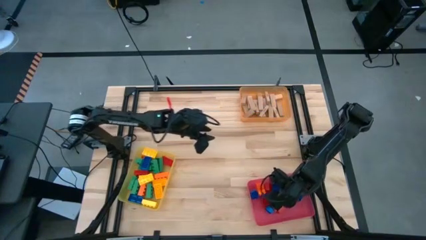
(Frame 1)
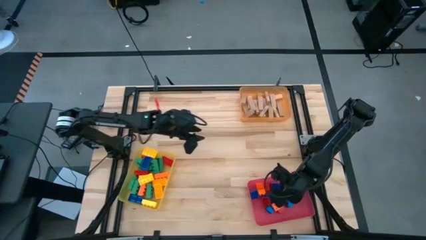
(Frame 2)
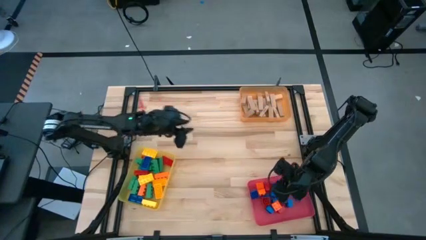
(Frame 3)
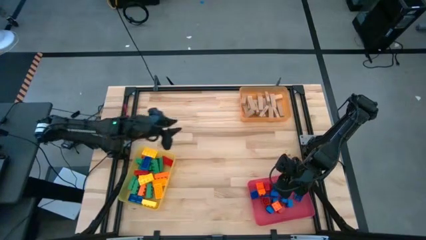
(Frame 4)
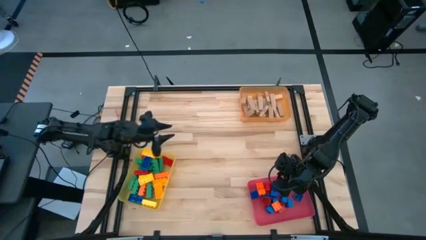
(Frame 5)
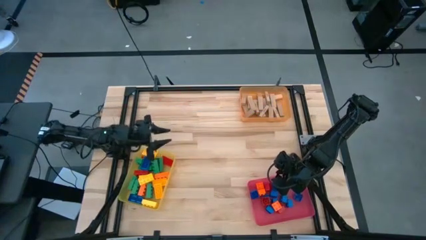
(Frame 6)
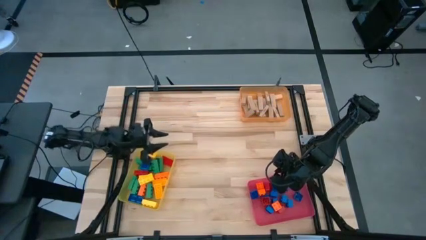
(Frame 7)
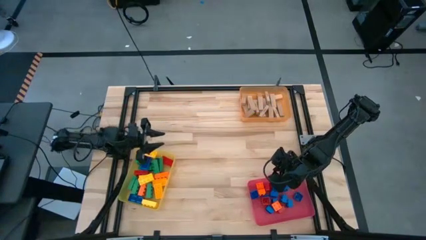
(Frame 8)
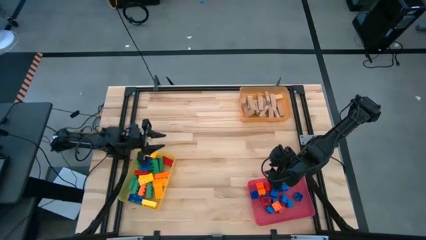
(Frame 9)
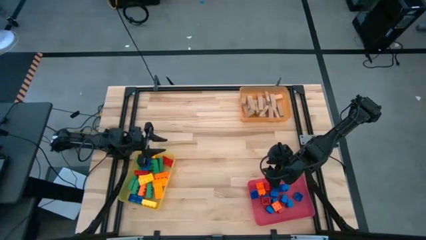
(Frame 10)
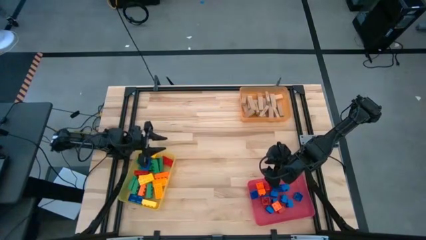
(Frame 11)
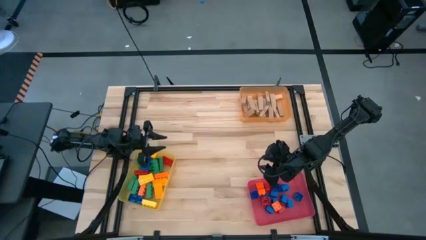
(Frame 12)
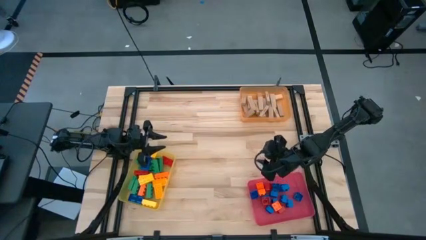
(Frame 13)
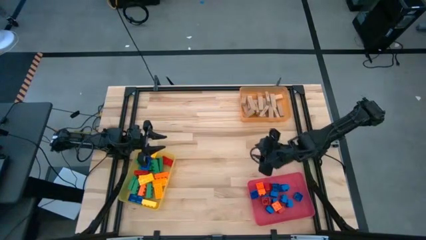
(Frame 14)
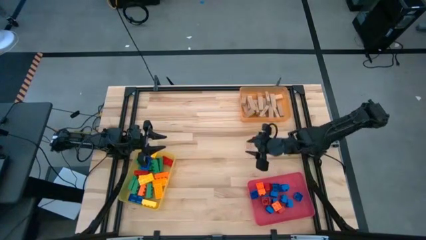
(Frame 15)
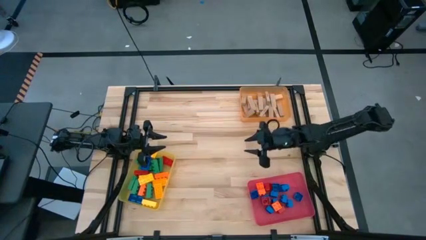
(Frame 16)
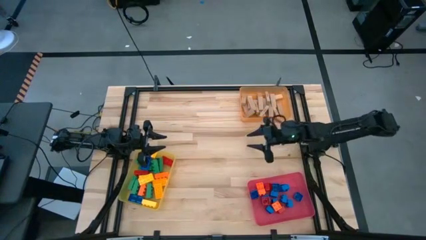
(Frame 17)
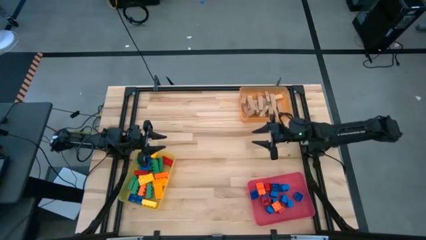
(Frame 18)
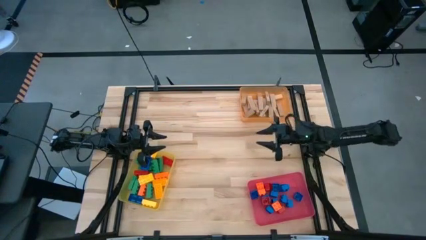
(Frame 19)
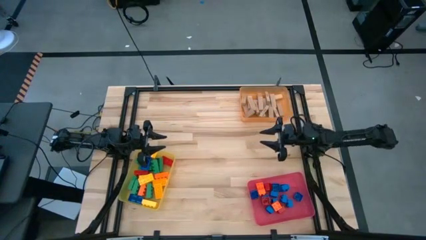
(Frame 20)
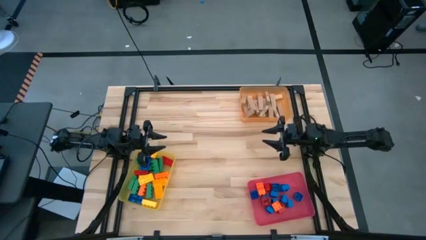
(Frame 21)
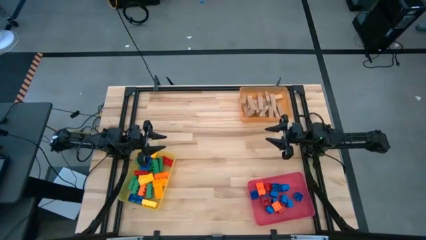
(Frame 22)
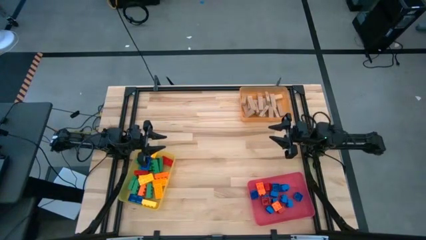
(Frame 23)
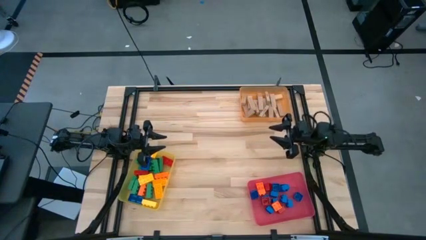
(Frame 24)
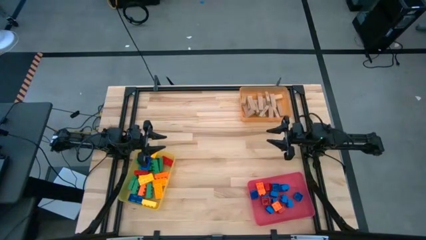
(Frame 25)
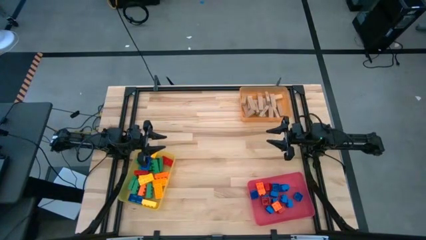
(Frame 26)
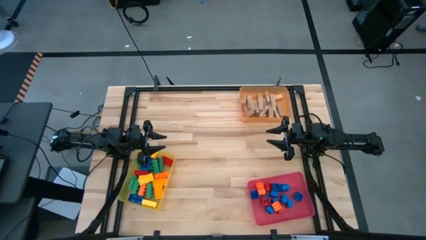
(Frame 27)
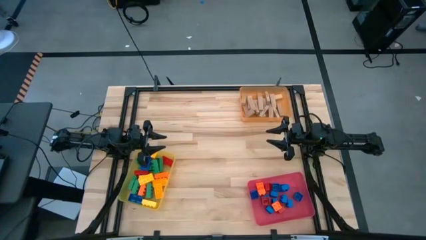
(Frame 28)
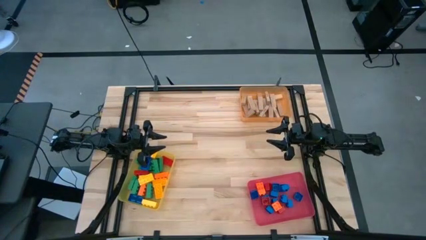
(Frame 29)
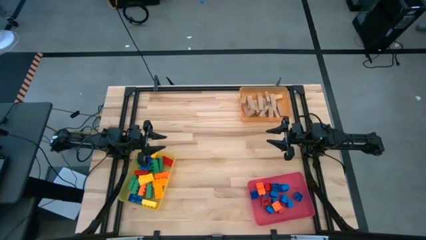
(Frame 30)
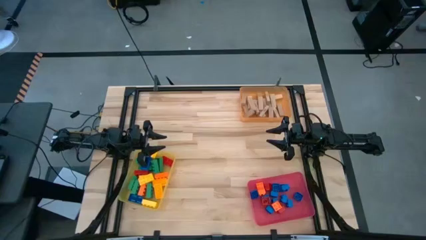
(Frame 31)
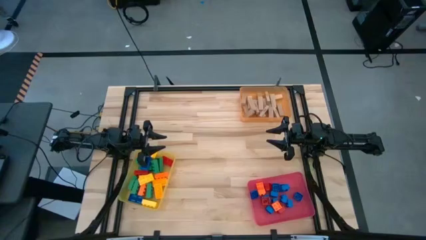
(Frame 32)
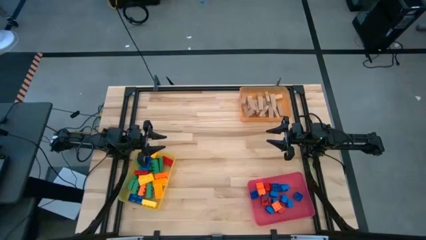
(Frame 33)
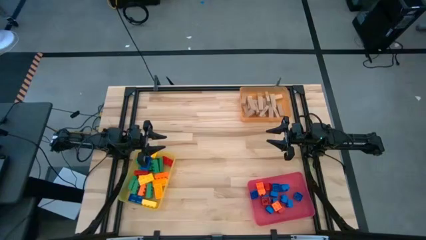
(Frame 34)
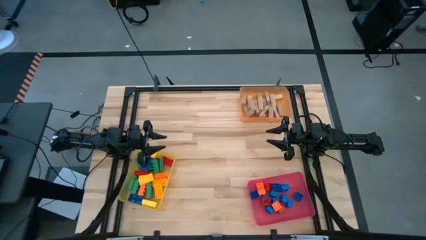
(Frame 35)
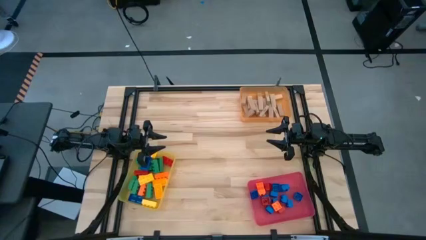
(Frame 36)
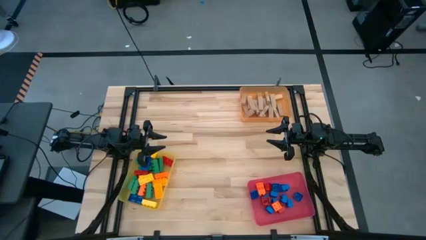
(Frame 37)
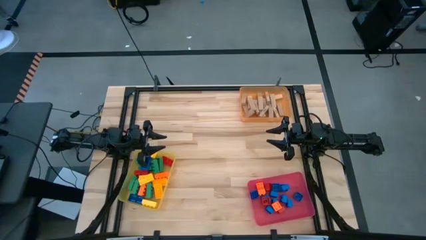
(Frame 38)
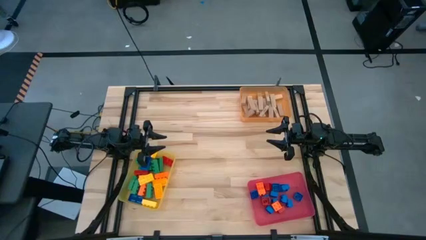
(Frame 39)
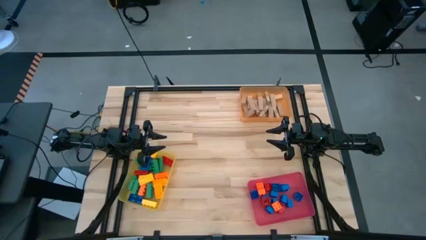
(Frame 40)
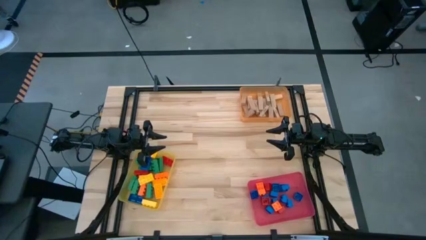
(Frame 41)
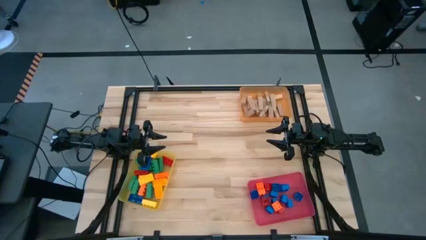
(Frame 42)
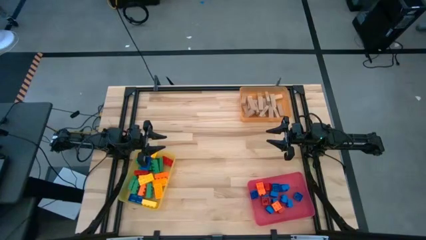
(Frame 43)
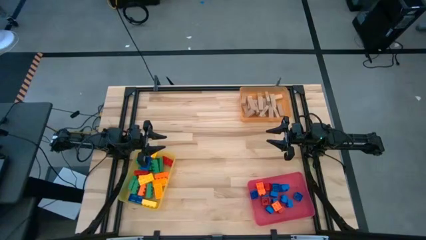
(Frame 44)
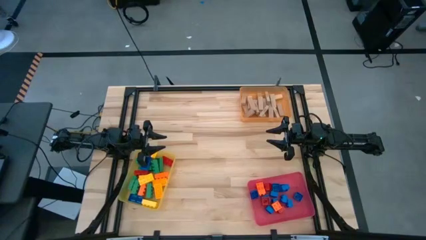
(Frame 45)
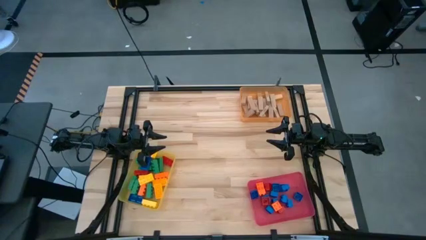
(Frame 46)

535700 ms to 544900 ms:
Task: Sort blocks by size
Return to Home Position

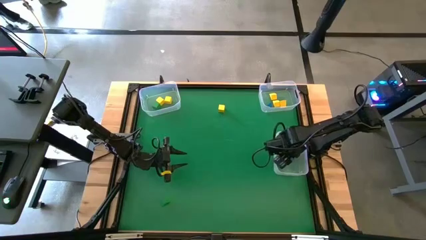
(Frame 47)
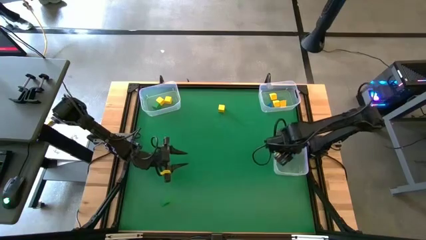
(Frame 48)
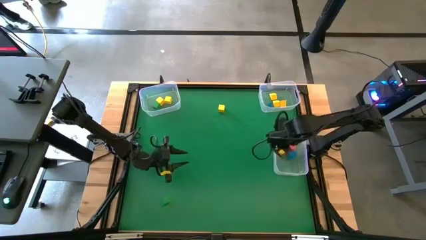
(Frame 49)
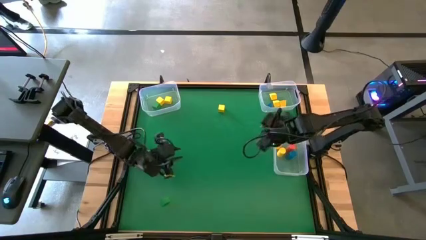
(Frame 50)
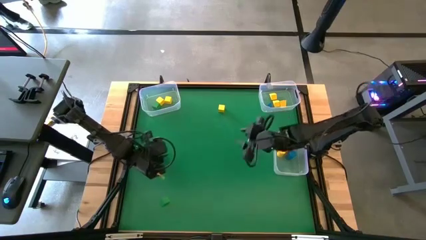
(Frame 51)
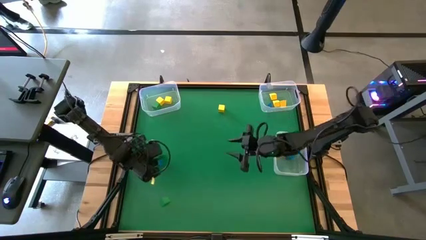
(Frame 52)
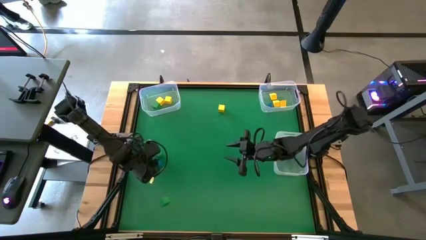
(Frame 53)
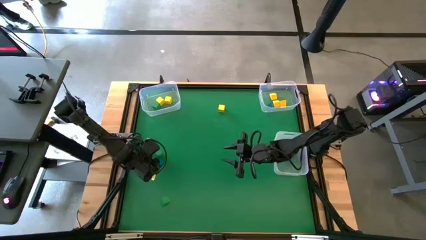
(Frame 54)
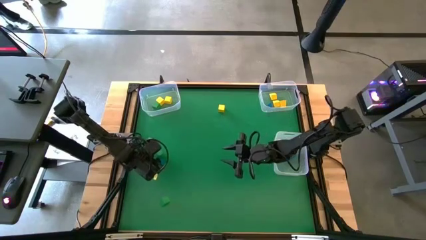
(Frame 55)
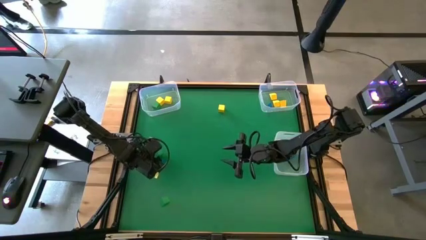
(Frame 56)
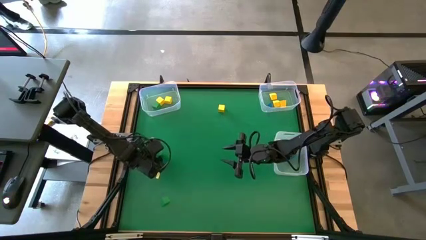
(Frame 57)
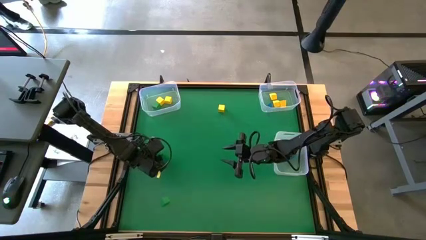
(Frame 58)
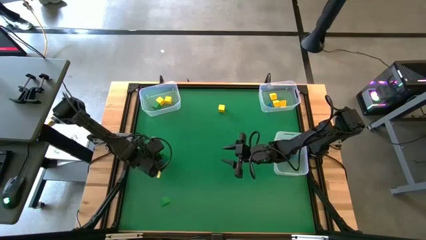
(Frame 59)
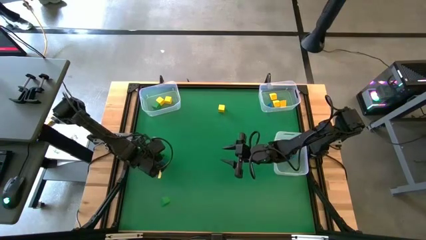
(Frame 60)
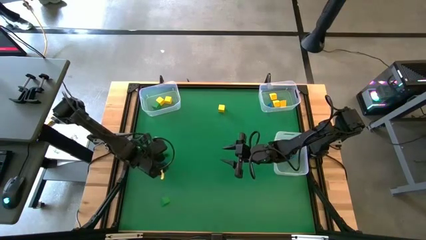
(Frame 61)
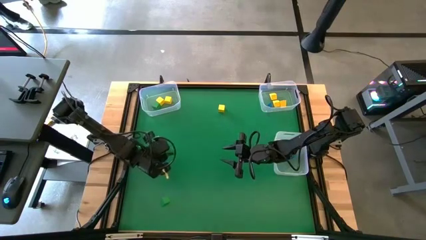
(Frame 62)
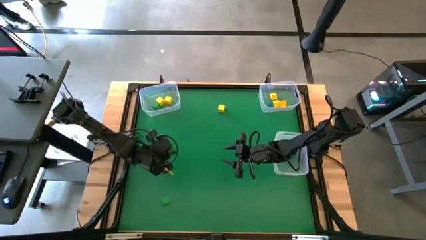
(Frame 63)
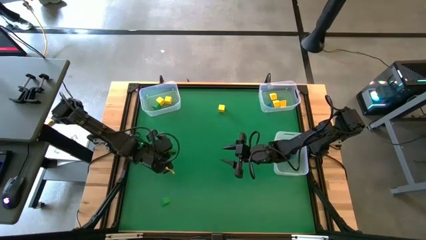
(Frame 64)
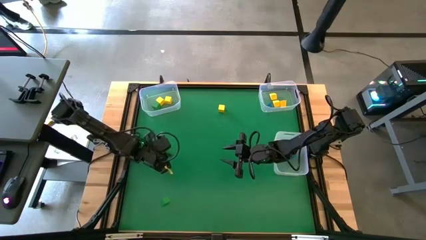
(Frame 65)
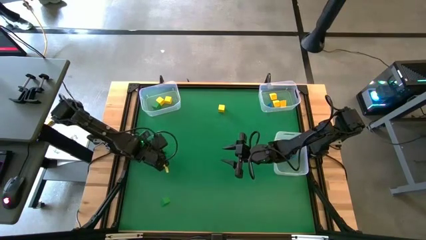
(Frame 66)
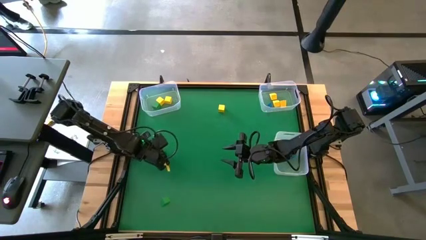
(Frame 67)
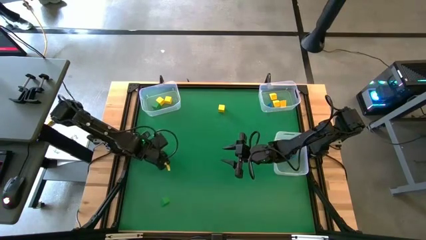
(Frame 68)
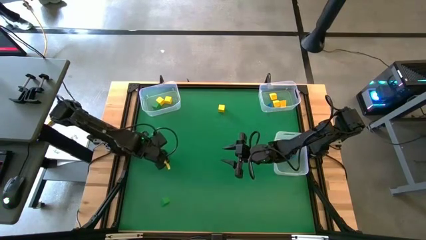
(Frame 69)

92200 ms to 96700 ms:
Task: Sort blocks by size
Put the green cylindrical block into the bottom transparent bin

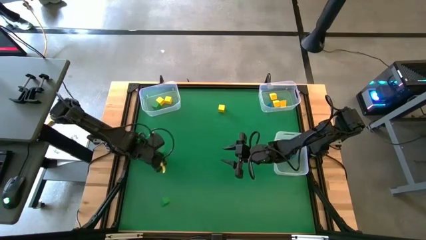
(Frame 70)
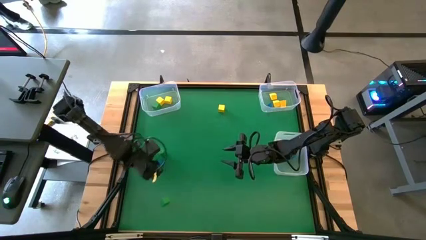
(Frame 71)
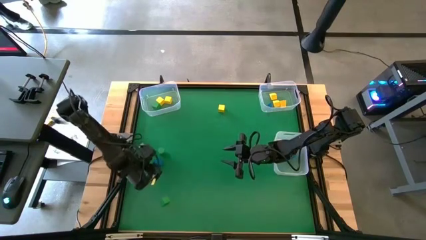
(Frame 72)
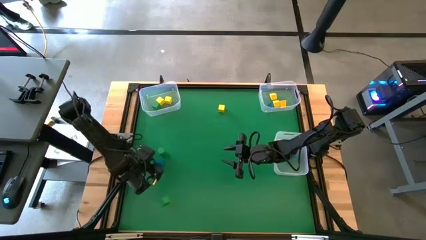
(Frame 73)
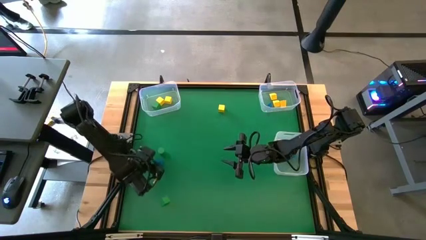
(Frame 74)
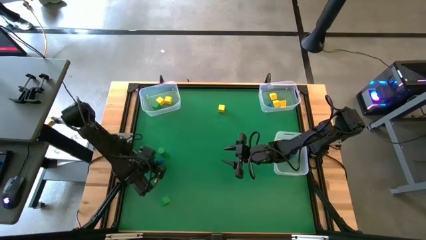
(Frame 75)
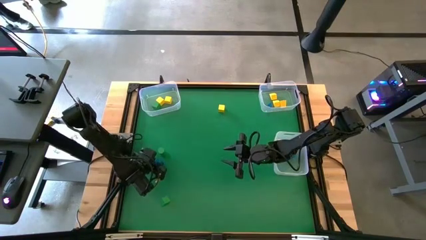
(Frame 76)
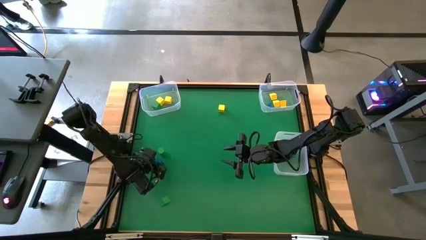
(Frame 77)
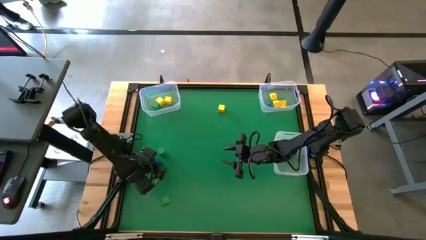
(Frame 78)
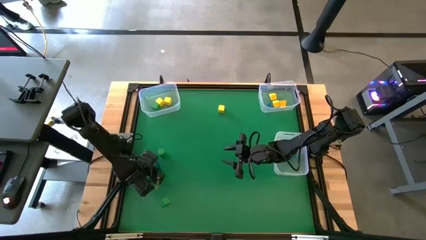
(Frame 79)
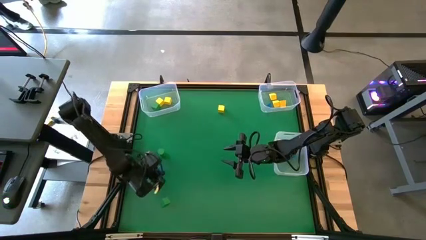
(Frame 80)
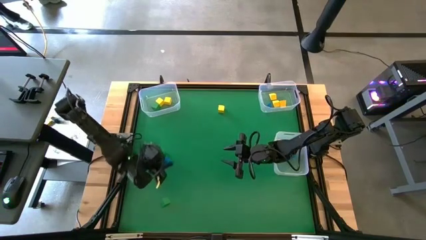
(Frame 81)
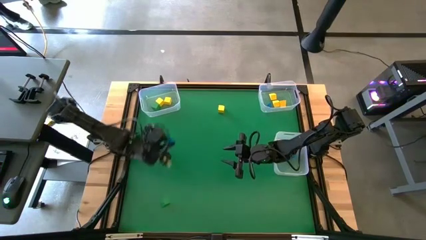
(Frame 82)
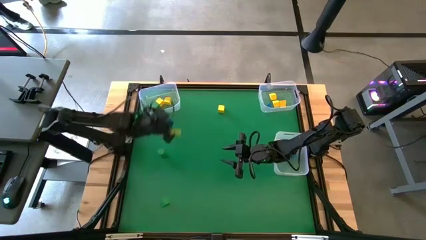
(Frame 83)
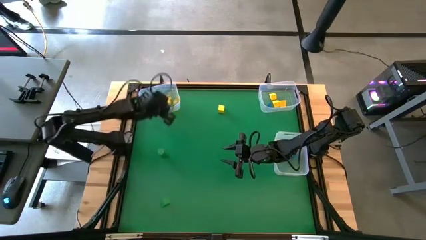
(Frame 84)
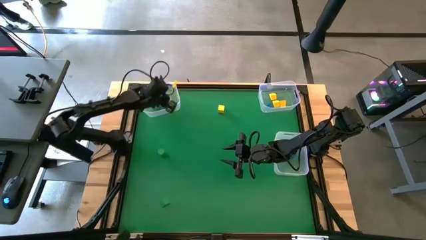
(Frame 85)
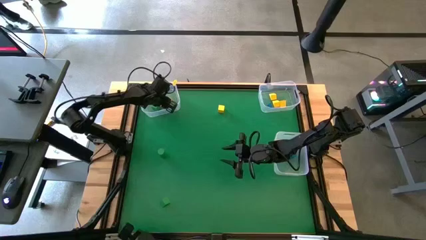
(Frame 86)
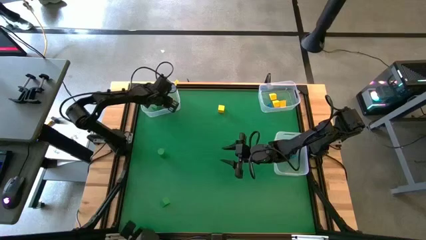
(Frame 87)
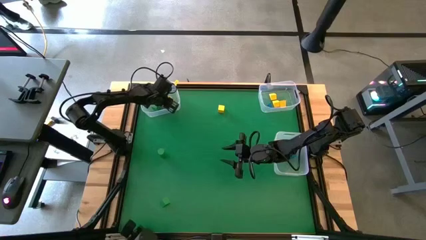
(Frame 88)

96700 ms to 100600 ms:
Put the blue cube block into the top left transparent bin
